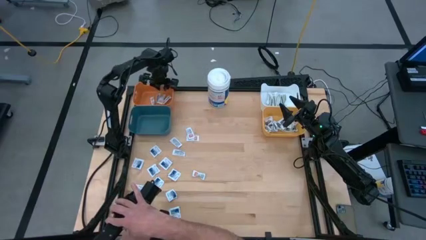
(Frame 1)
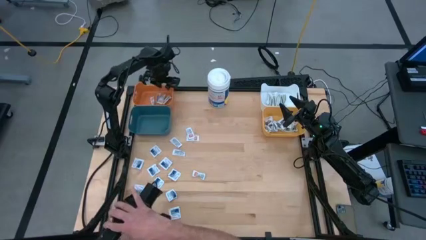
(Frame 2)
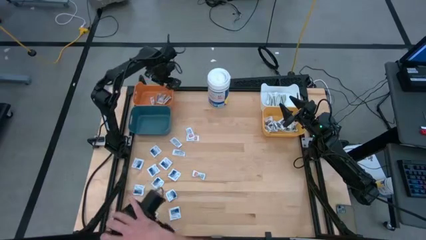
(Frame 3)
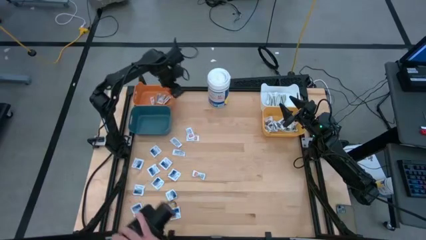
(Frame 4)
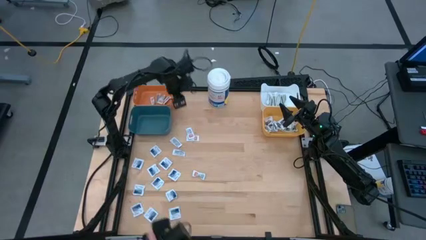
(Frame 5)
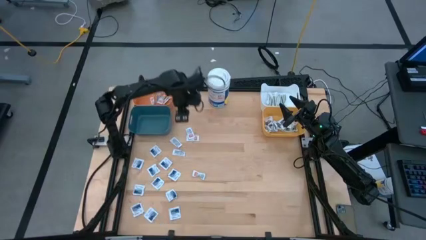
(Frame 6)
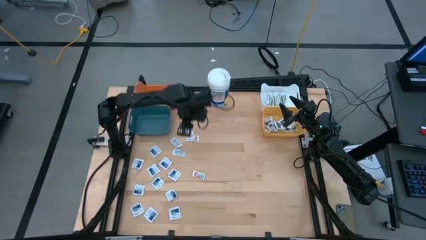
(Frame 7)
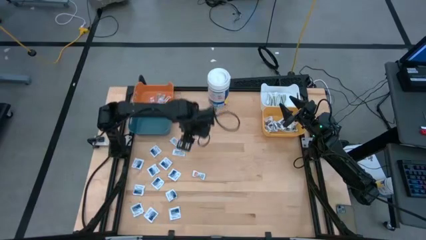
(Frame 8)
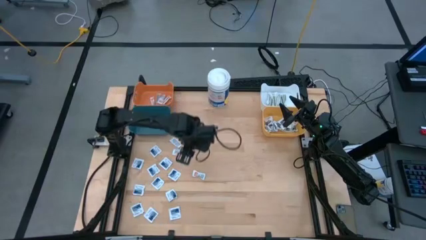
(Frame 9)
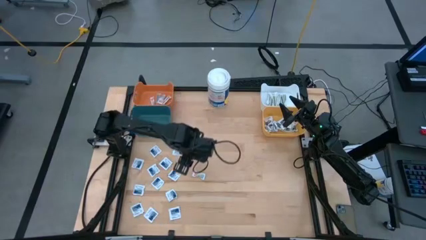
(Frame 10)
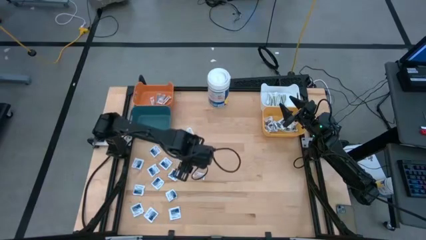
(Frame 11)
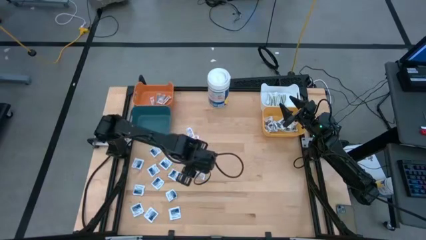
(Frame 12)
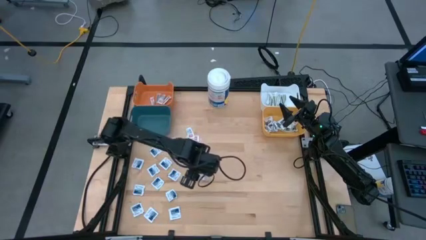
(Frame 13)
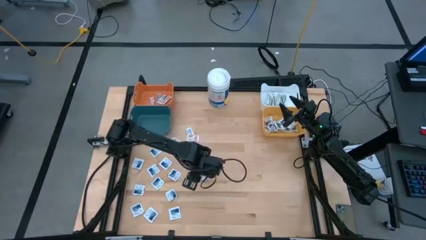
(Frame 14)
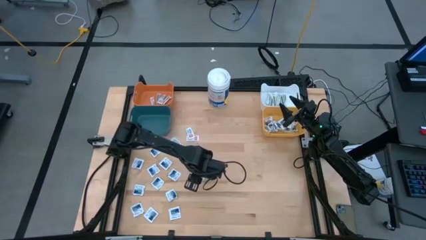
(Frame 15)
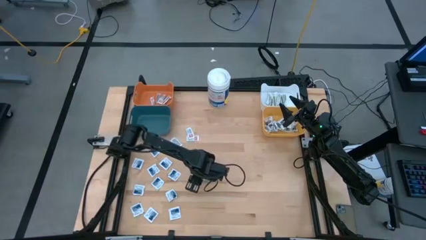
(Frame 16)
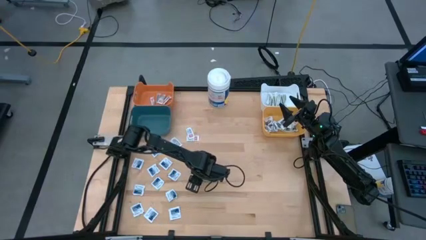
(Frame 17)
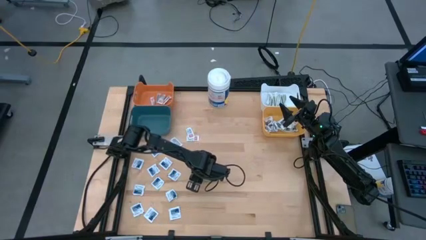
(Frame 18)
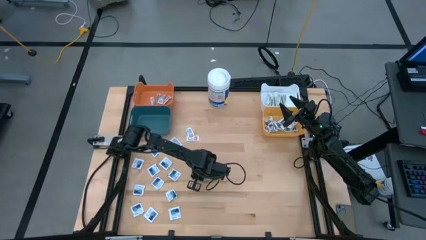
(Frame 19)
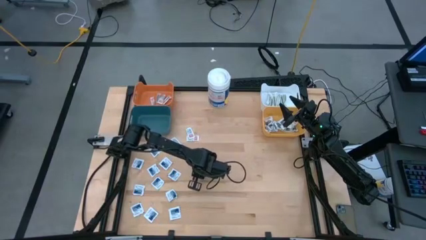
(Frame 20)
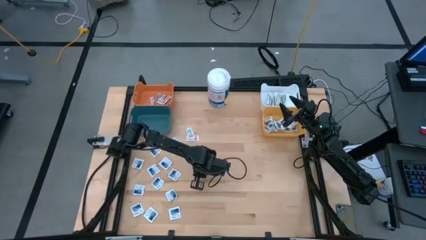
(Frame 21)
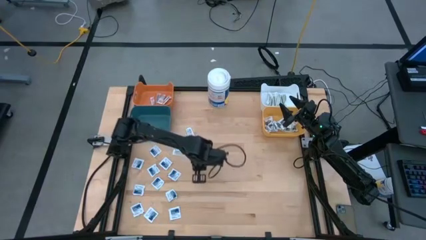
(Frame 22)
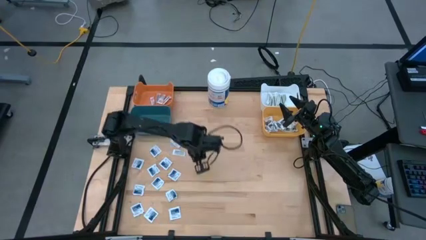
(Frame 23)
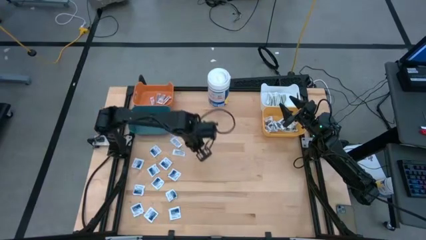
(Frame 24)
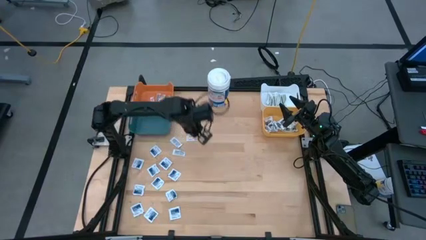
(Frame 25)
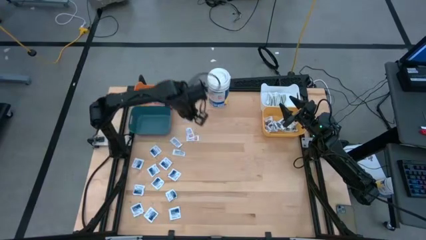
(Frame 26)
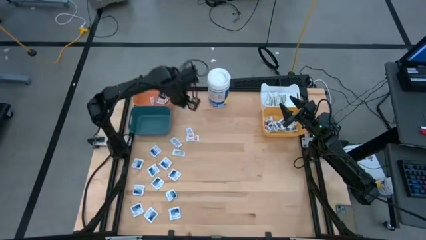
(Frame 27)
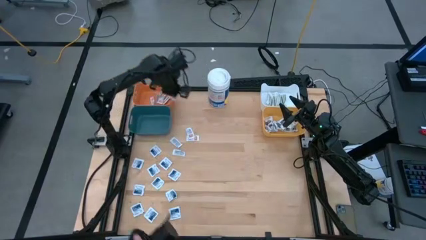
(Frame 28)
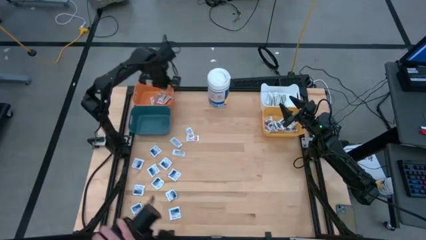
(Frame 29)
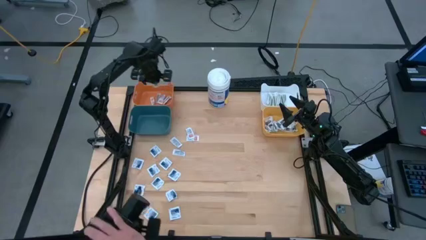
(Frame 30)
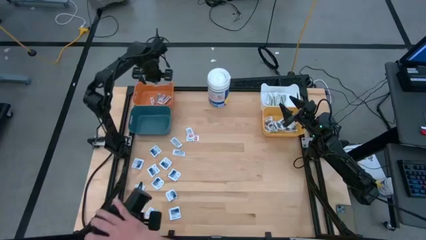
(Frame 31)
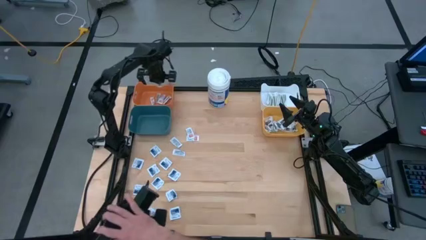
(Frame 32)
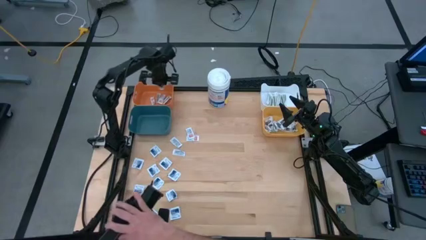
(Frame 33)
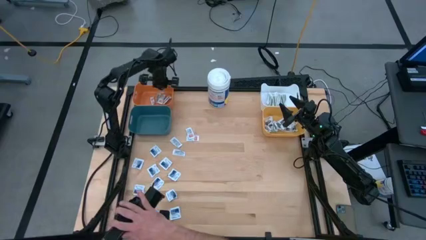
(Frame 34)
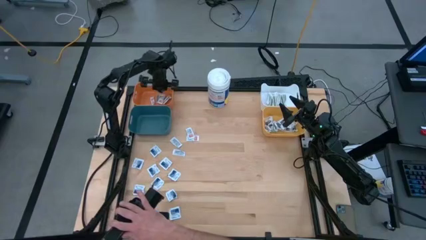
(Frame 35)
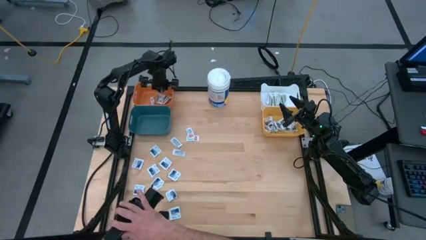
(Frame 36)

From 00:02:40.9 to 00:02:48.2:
Task: Pick & Place First Aid Supplies
Put the orange pad into the orange bin

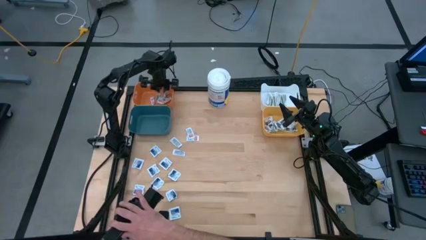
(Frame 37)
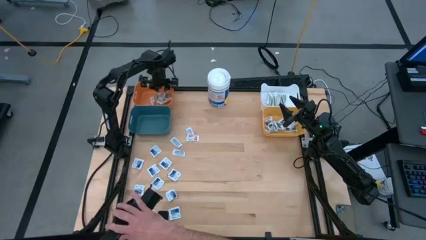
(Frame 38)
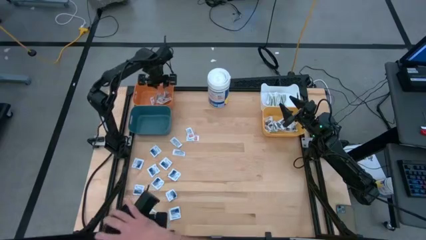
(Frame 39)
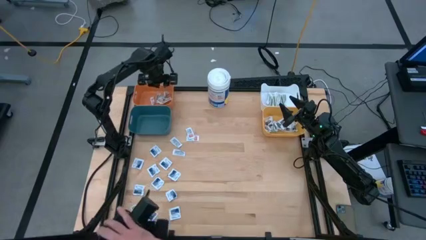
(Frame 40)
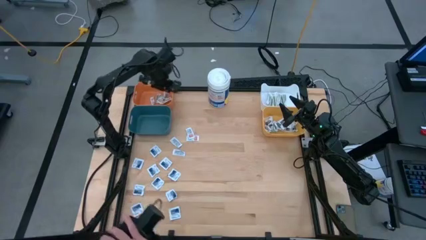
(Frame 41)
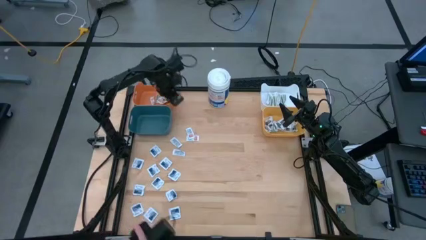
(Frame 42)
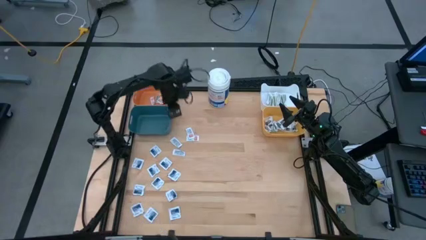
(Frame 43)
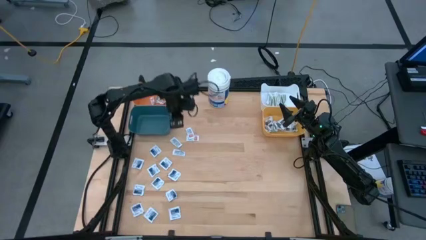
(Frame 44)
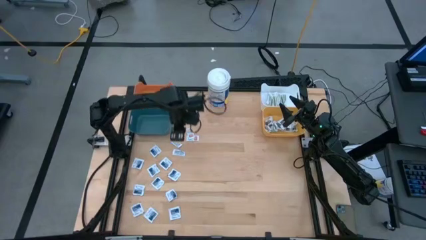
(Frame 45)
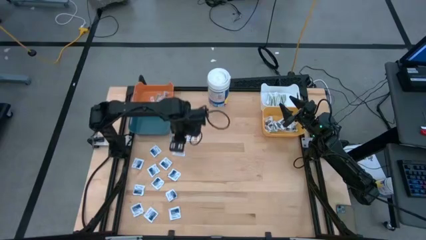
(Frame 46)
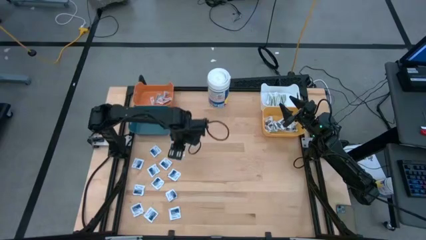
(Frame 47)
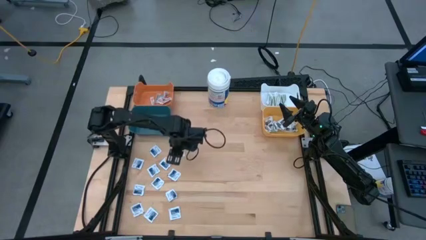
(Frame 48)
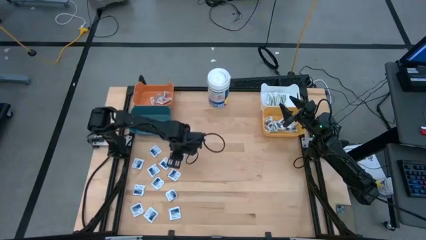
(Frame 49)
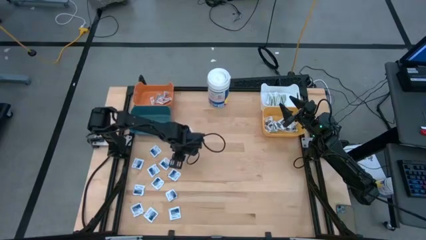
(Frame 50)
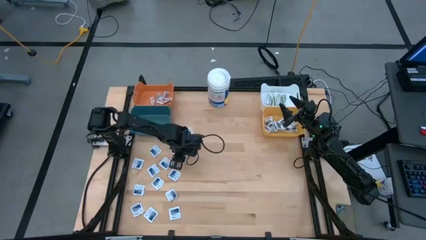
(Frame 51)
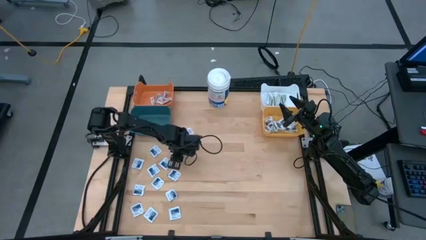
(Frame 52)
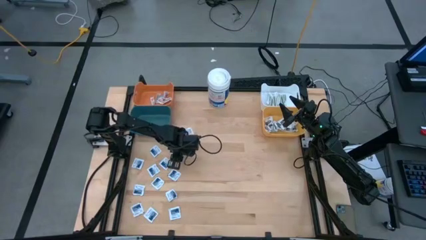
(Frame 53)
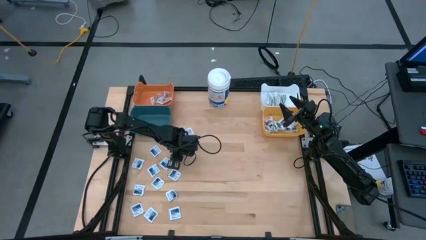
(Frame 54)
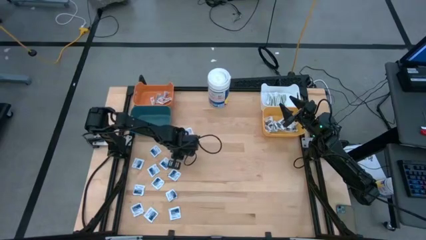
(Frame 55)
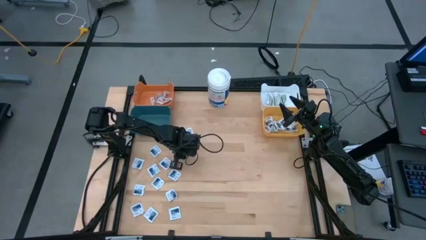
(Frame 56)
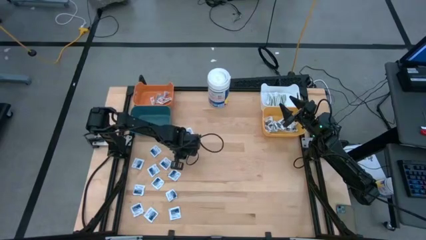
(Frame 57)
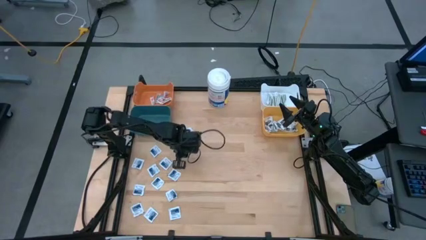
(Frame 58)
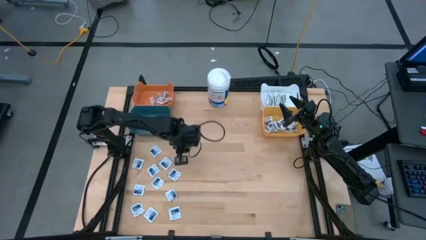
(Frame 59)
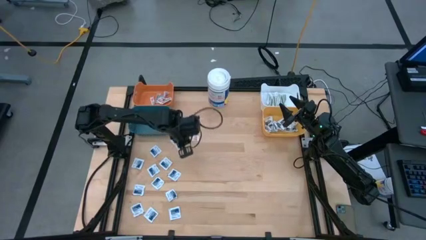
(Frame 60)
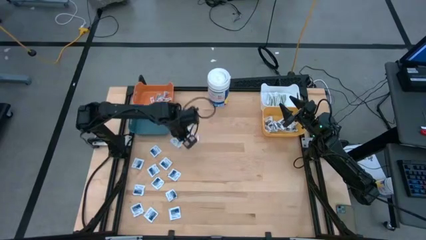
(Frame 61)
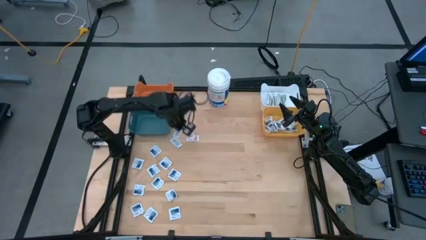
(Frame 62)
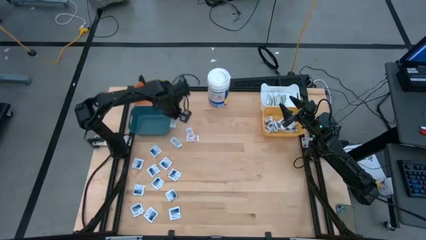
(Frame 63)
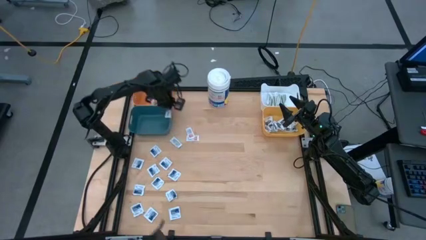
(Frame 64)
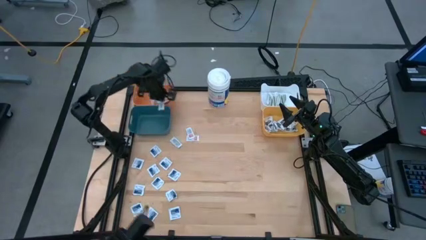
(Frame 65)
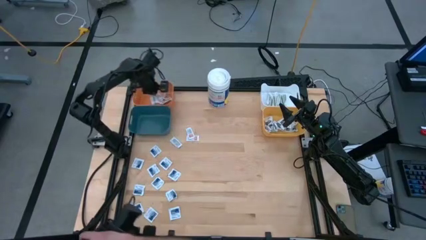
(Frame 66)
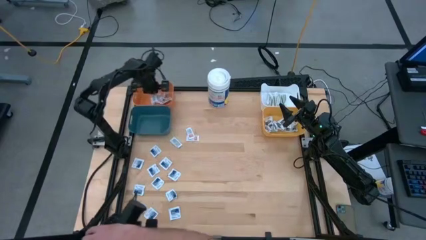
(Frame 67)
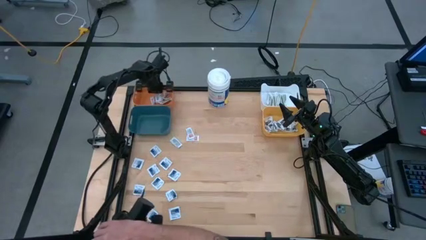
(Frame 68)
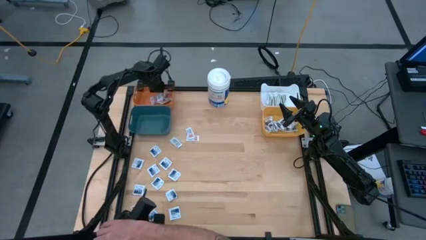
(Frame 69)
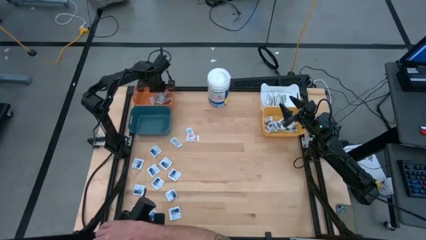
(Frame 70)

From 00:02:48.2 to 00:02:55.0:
Put the orange pad into the orange bin

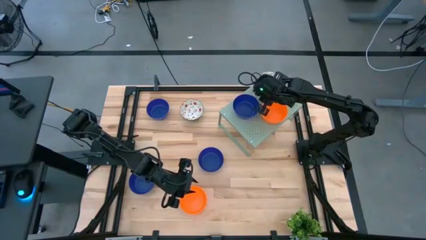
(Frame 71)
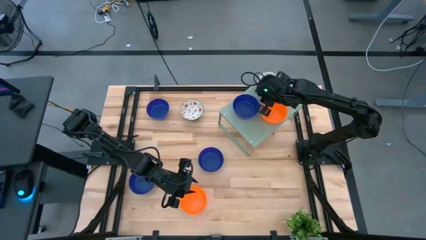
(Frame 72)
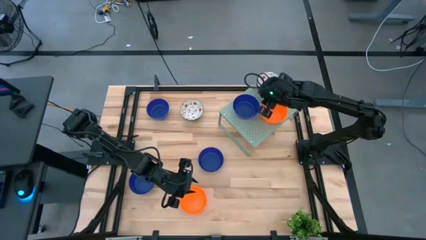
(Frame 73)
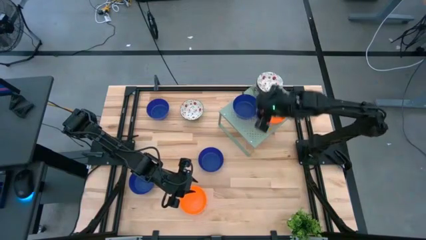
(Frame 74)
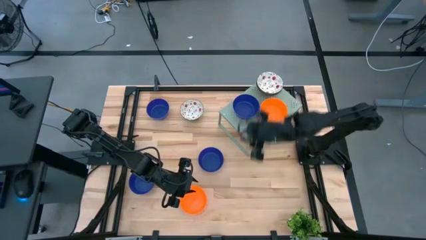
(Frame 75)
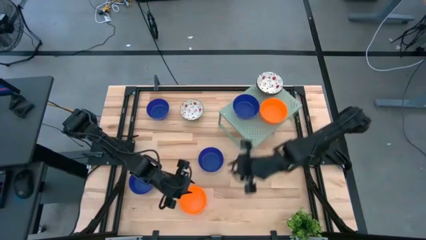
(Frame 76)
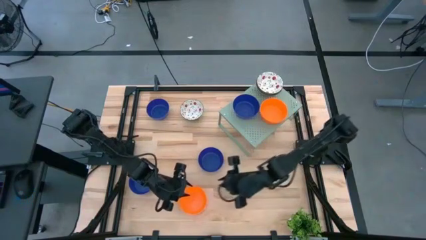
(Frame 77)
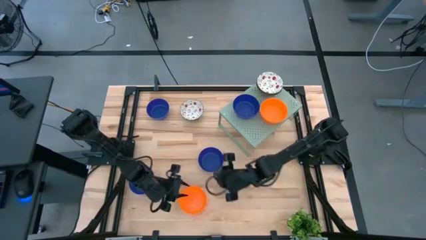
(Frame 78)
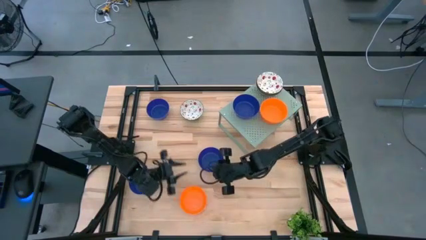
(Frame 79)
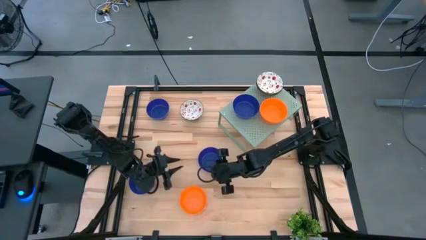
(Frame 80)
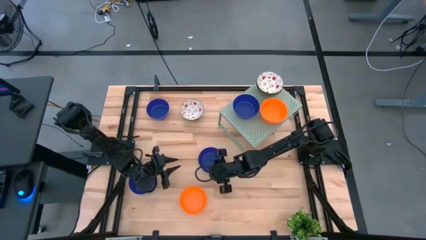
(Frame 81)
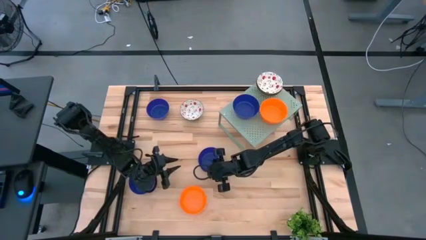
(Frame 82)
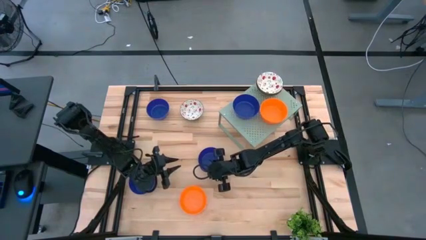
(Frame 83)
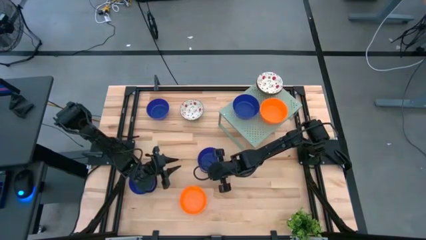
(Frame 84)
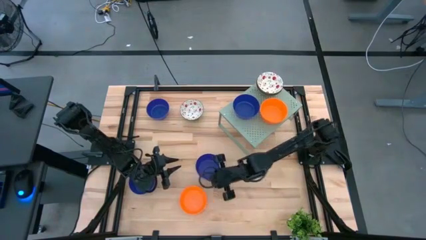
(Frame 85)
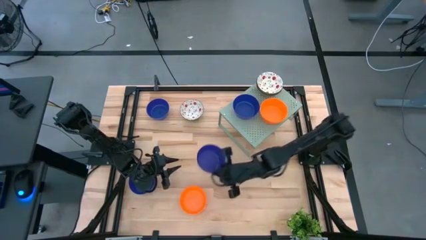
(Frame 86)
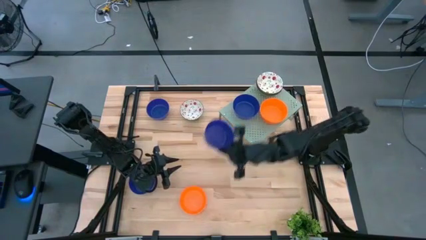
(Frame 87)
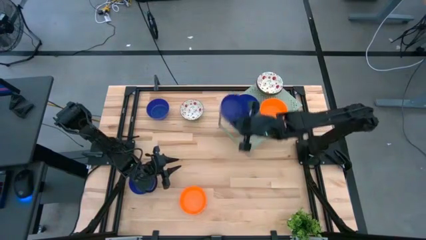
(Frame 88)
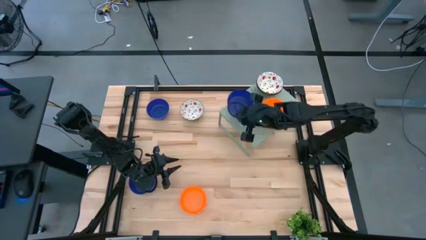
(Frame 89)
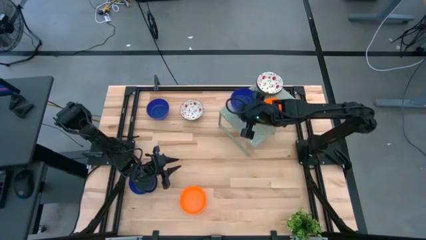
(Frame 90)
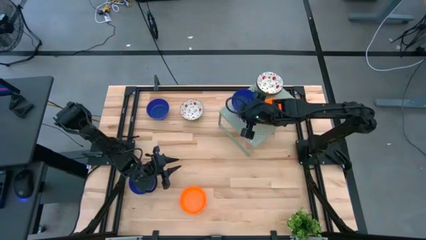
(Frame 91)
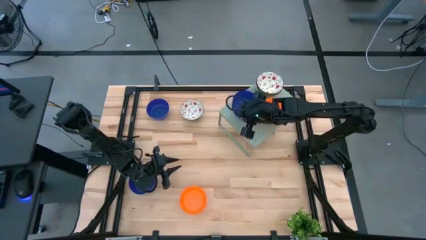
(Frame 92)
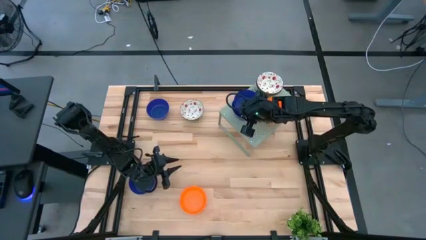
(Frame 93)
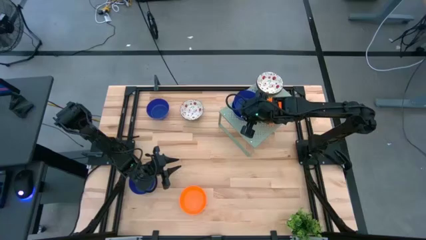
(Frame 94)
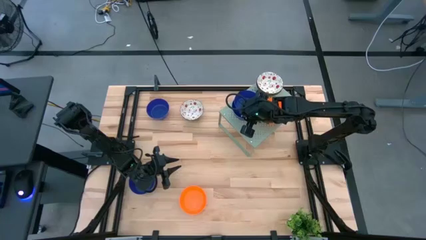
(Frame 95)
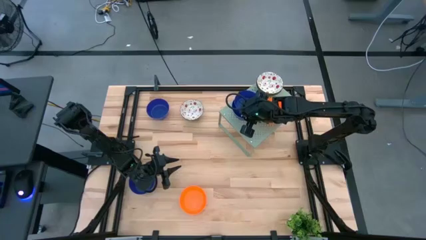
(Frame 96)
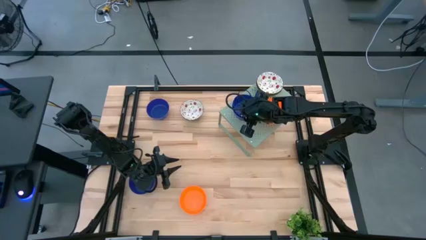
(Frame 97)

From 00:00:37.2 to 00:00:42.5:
Task: Pick & Place Mini bowls
Stack the blue bowl on the blue bowl on the shelf
